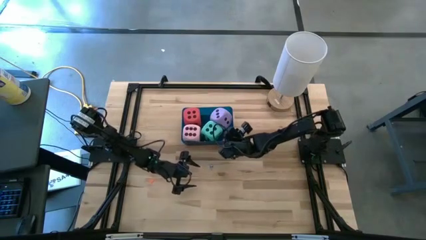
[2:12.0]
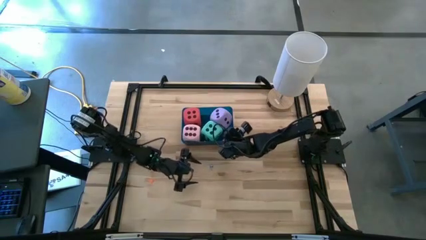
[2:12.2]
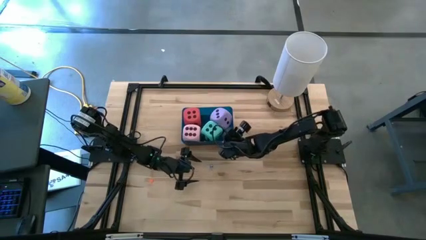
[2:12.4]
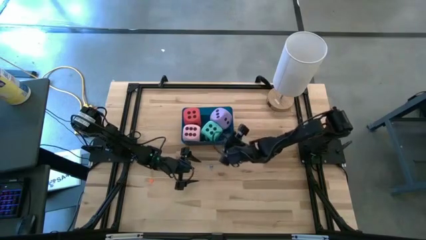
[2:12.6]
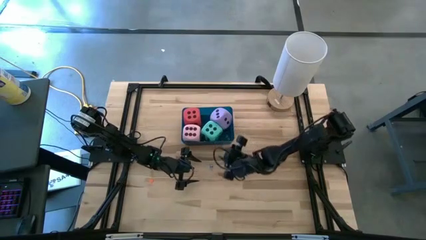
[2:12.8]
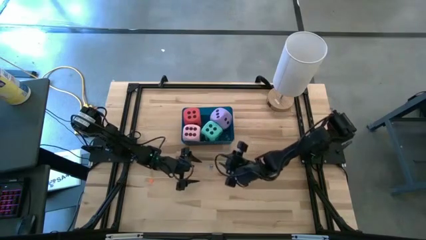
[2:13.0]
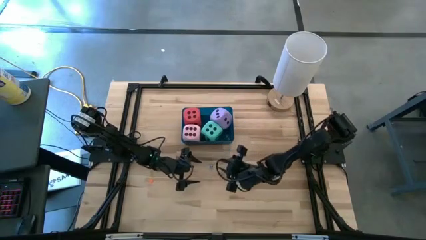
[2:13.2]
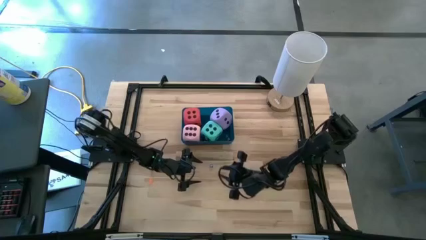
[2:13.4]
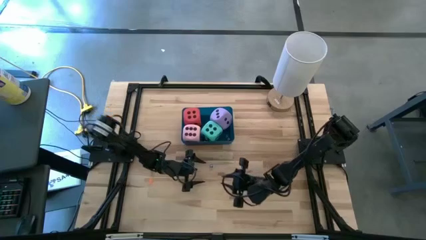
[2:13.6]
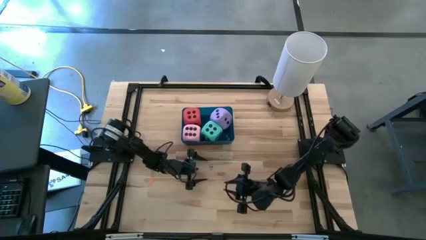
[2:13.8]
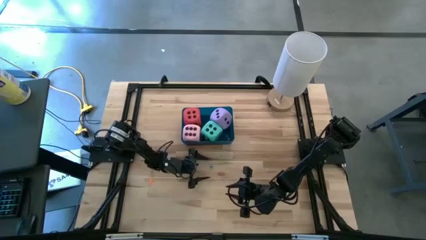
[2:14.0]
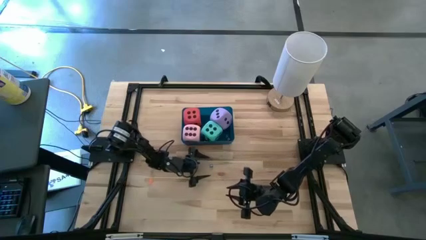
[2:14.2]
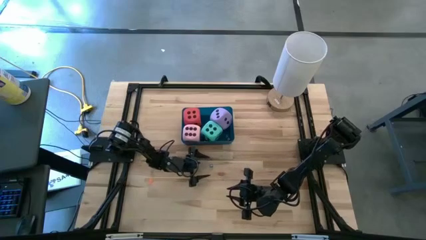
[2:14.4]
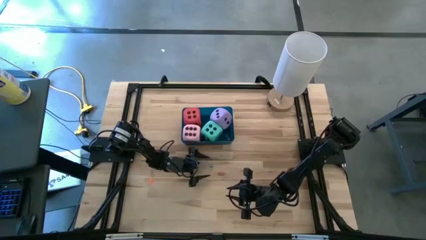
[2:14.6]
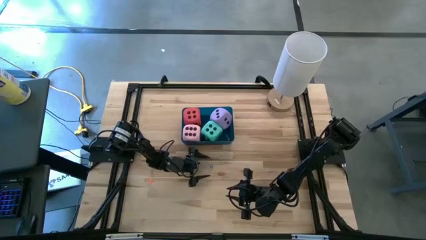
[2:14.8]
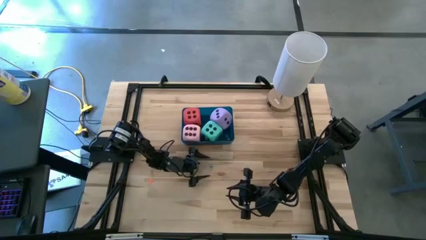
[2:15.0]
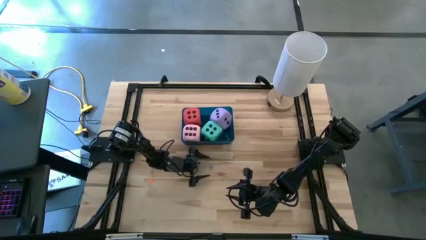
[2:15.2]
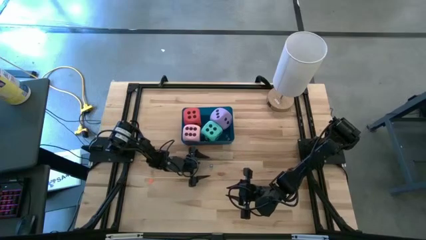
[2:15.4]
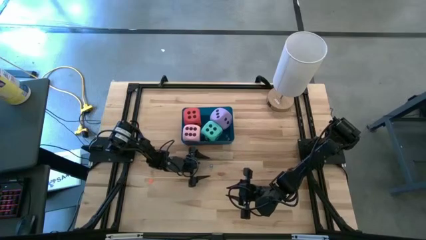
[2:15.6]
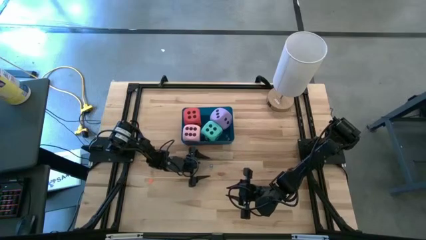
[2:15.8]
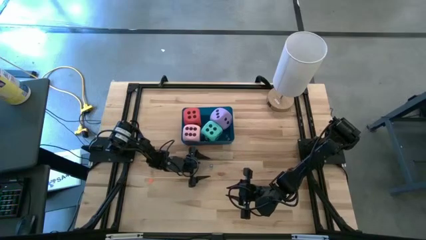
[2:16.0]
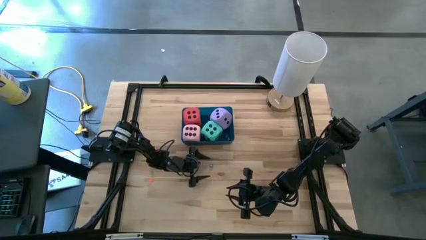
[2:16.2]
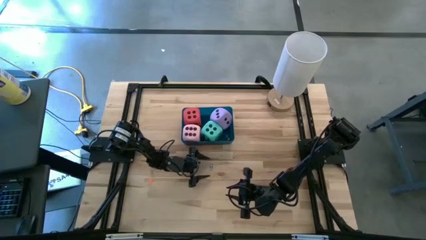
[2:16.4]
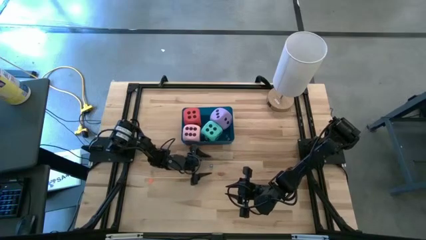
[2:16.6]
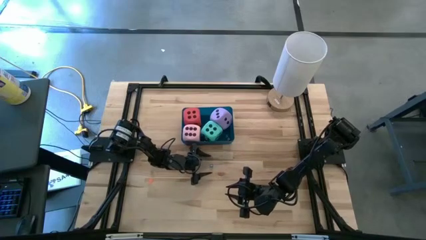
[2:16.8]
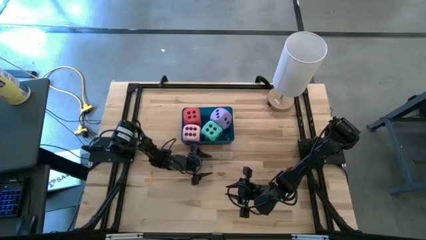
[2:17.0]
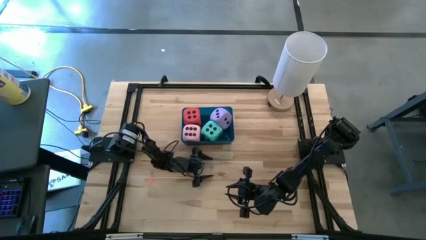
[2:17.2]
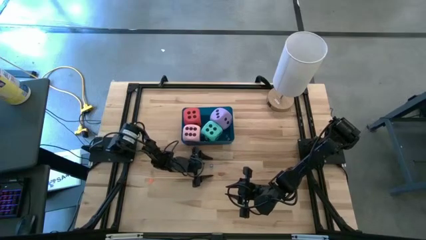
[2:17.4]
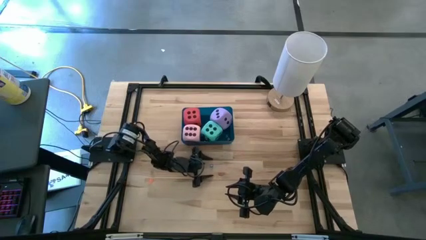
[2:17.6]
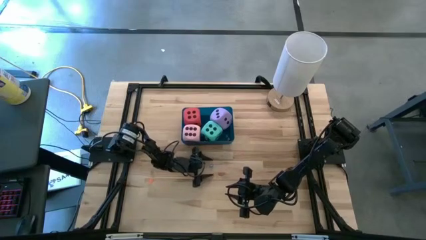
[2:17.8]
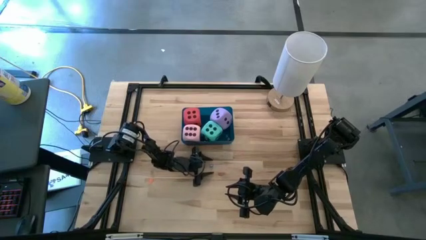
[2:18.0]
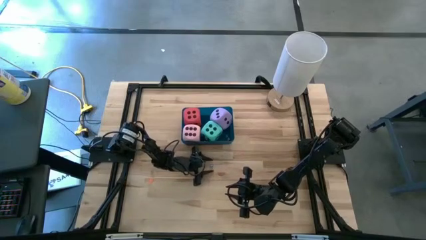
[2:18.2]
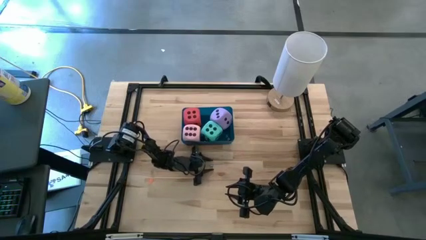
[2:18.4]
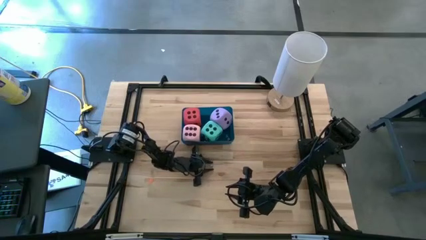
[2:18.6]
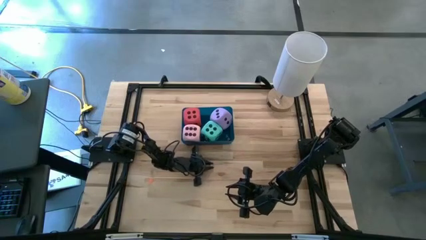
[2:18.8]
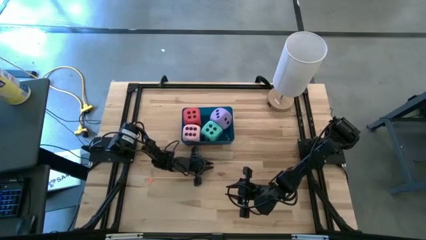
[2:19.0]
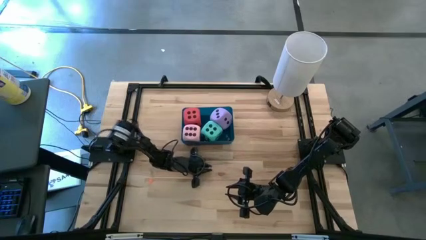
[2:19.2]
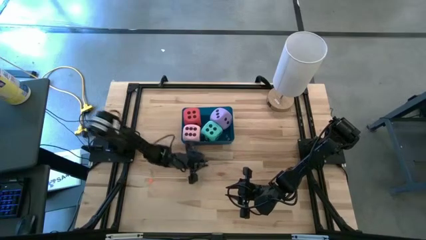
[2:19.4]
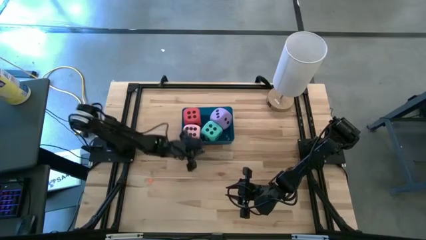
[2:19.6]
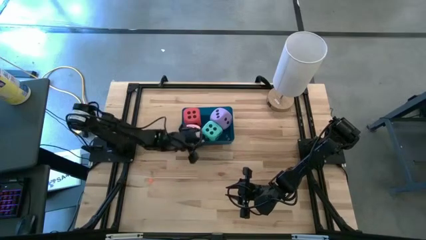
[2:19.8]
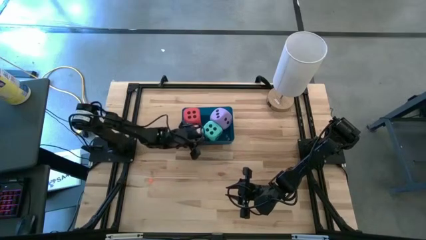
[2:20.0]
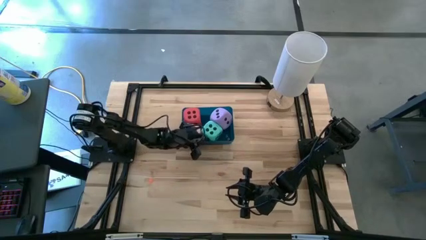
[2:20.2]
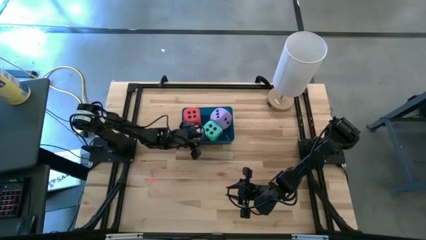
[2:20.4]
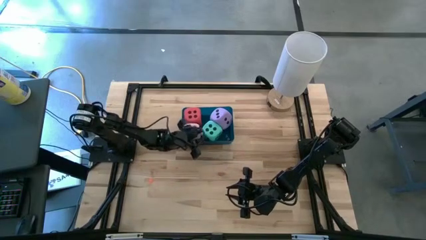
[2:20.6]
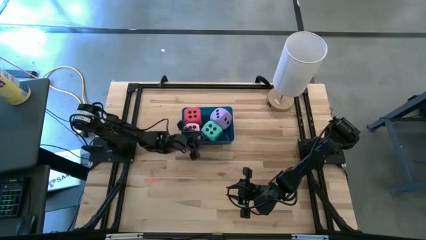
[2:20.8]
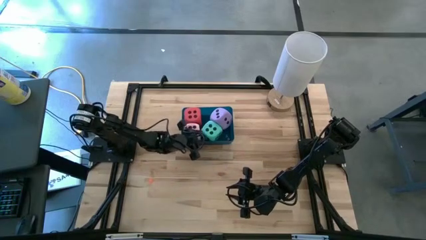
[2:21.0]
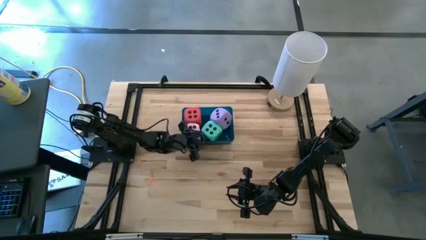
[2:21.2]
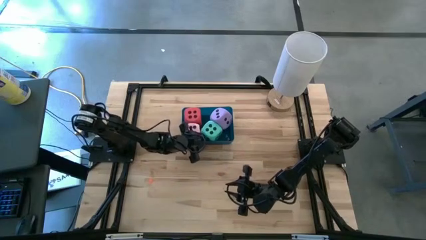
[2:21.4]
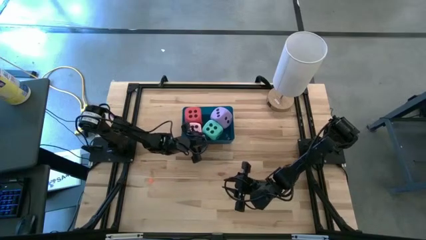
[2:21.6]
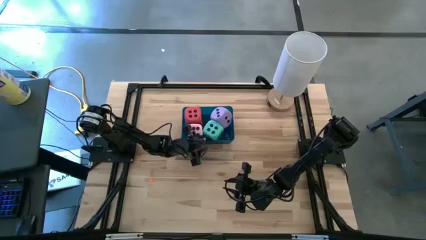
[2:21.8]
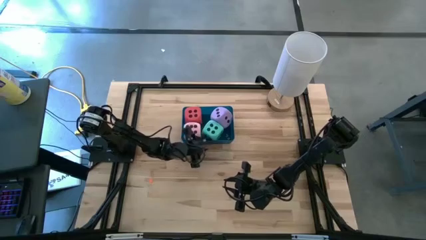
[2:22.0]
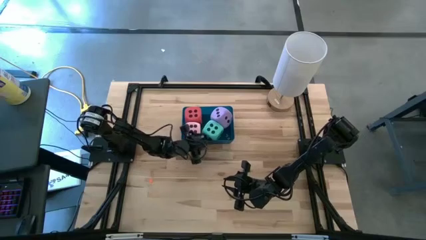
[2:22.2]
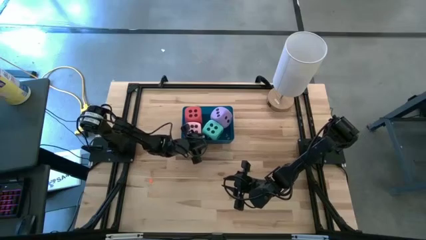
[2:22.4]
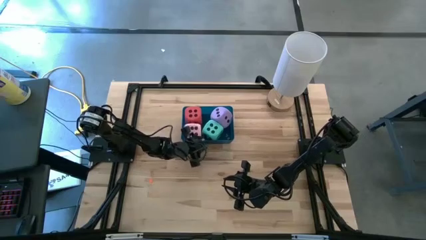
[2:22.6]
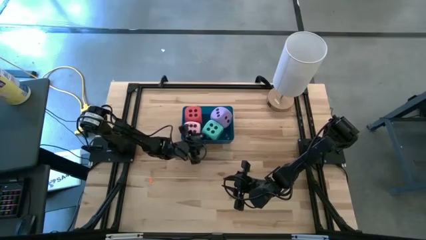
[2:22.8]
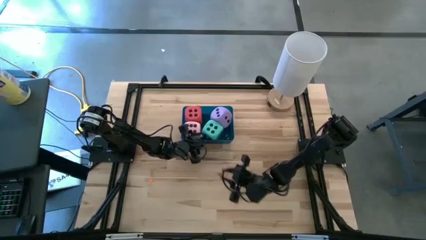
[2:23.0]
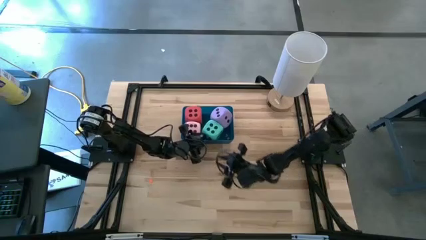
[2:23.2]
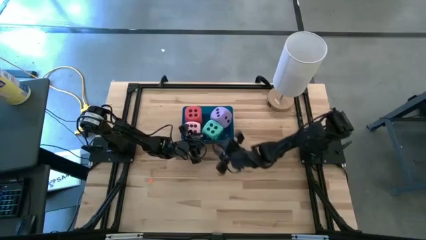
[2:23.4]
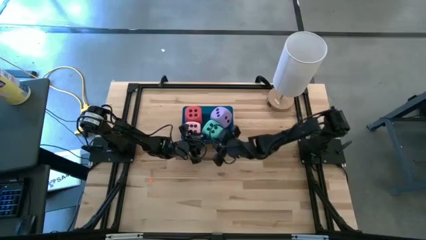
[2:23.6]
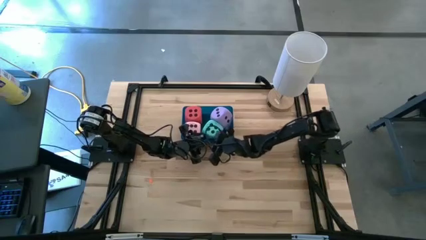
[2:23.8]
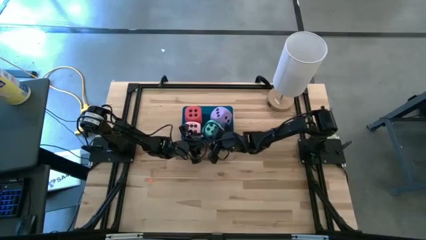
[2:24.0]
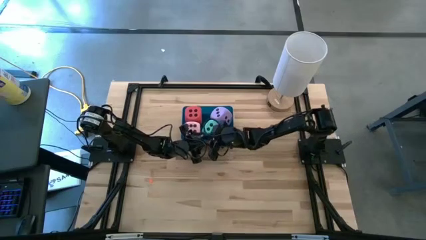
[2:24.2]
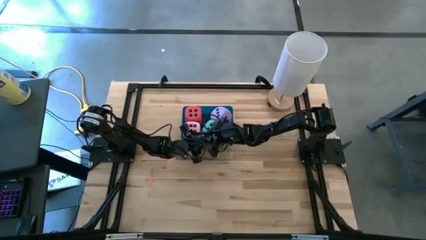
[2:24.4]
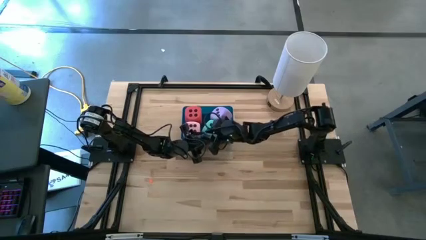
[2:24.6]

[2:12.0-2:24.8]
Task: Pick & Place Dice
Put the small blue dice into the blue bin

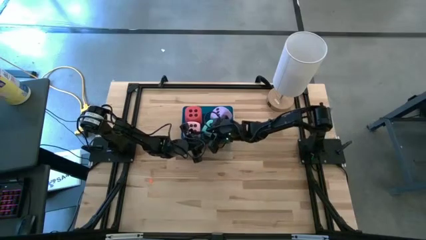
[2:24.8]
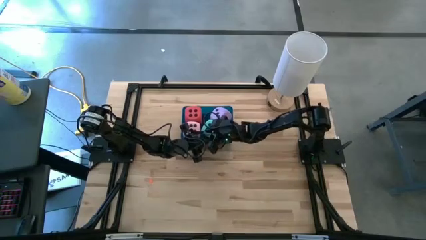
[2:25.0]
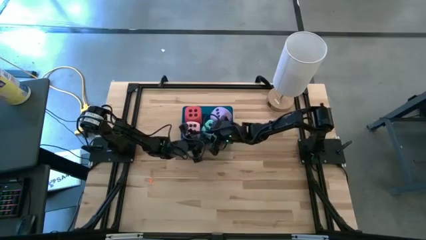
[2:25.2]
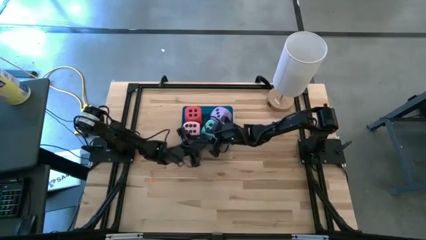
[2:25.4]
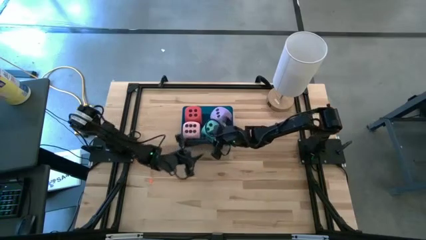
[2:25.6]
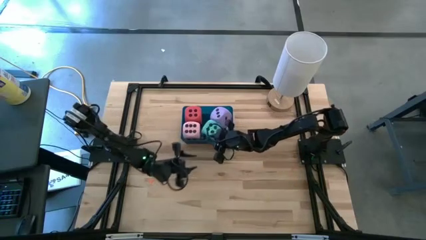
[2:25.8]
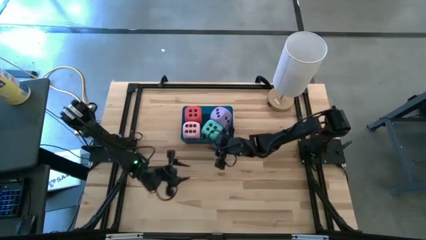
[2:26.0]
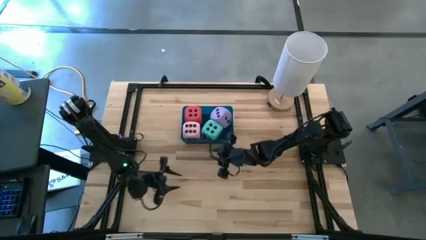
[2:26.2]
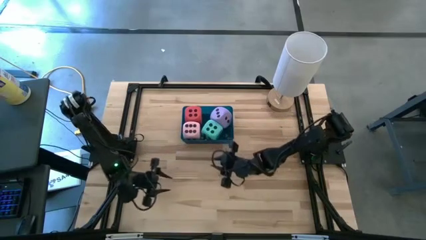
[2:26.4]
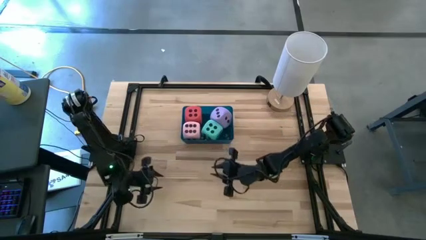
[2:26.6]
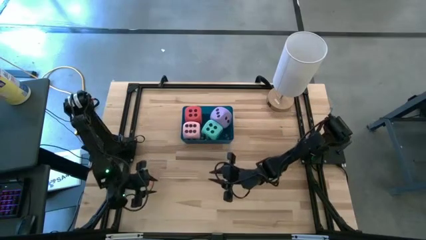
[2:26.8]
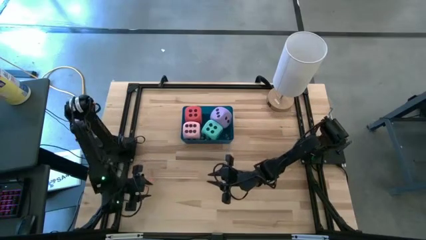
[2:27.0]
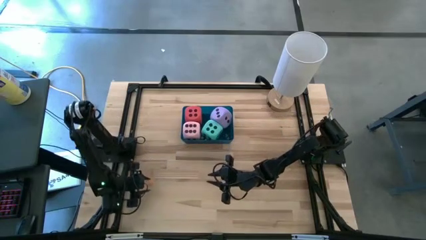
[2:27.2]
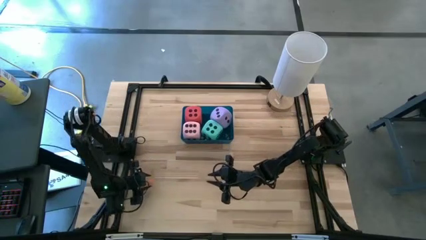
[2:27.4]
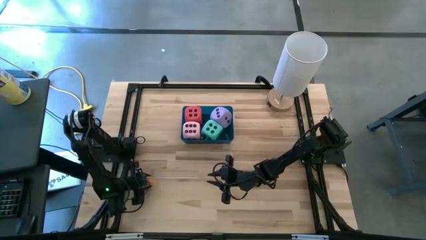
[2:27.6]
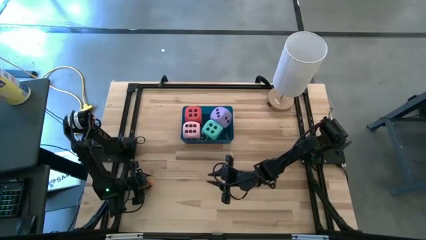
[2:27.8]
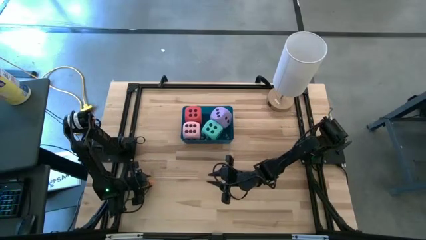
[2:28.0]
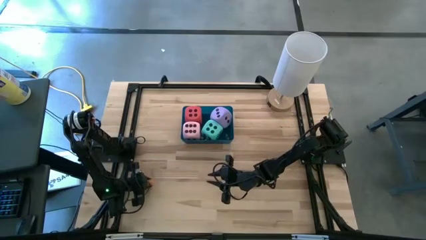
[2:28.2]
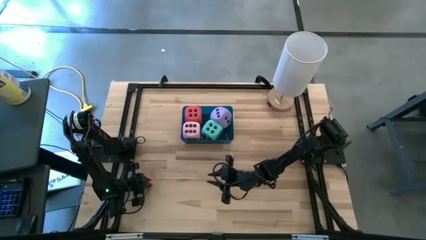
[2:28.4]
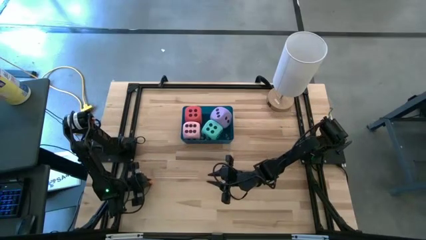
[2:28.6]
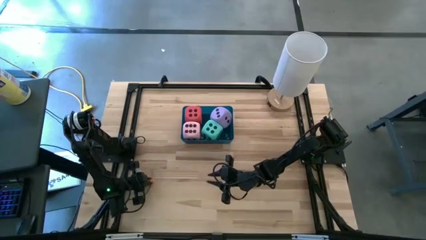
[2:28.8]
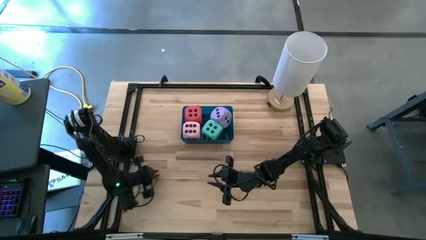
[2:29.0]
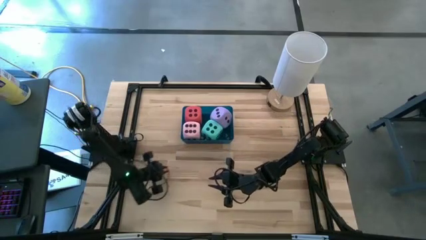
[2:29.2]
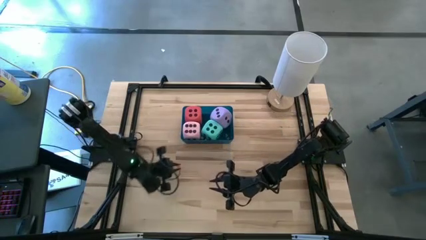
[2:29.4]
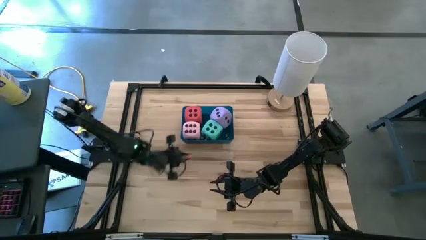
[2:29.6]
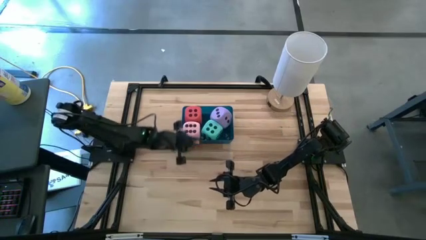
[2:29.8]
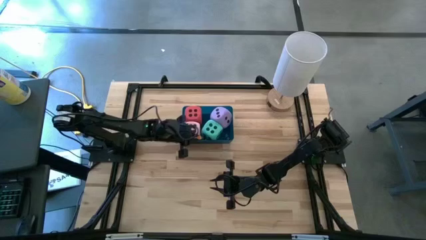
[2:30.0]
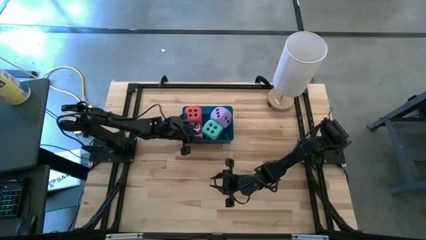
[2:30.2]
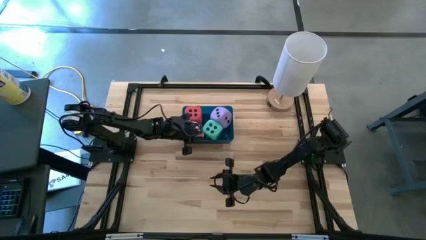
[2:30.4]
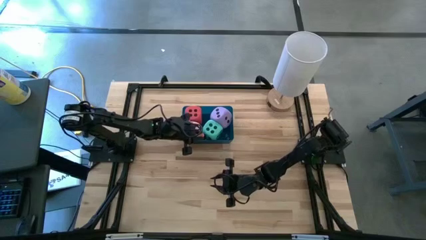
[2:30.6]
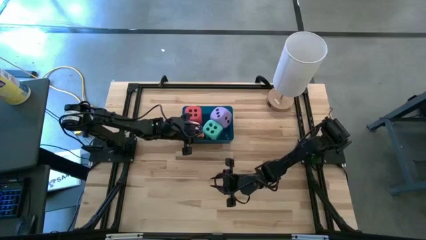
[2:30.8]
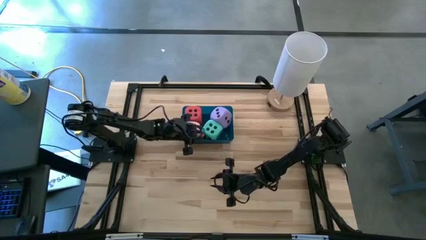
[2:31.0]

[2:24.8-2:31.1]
Put the small orange dice into the blue bin
